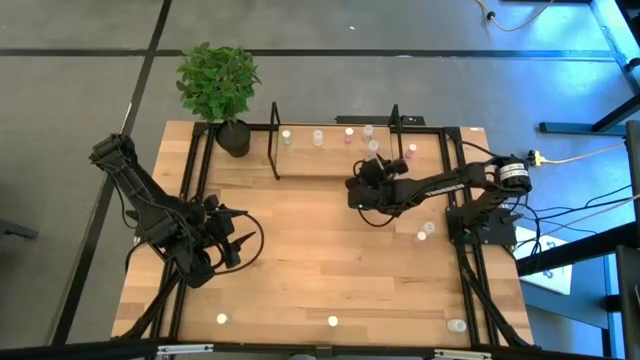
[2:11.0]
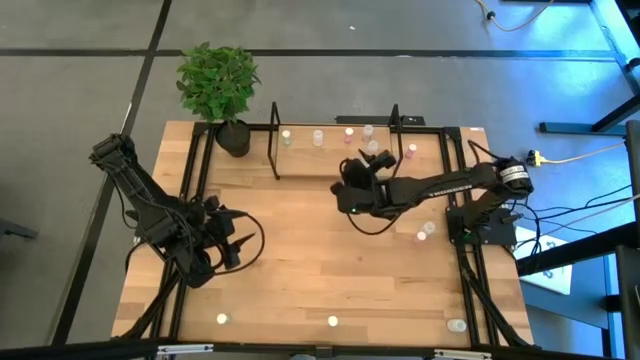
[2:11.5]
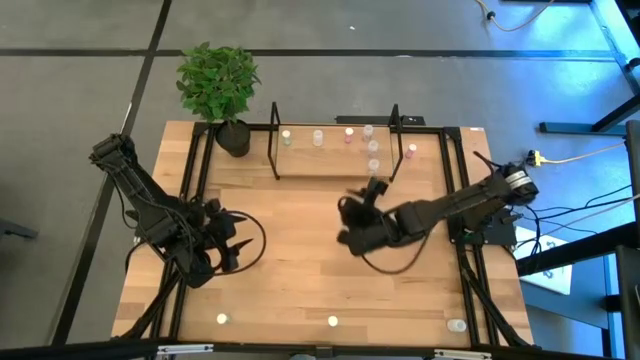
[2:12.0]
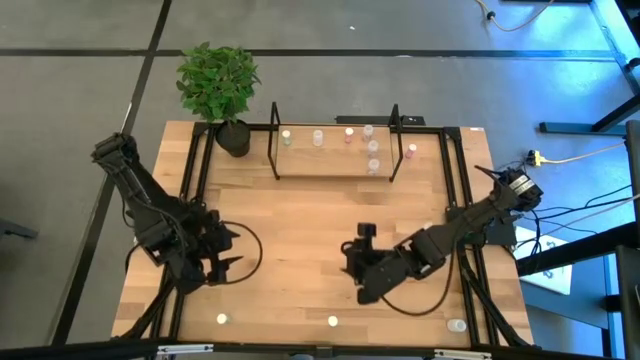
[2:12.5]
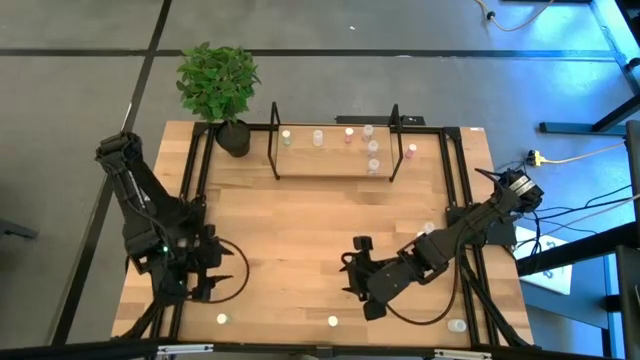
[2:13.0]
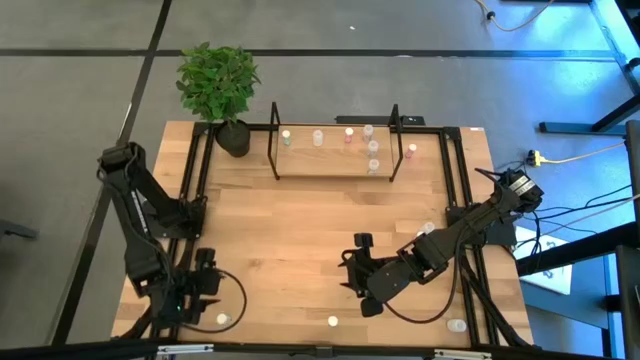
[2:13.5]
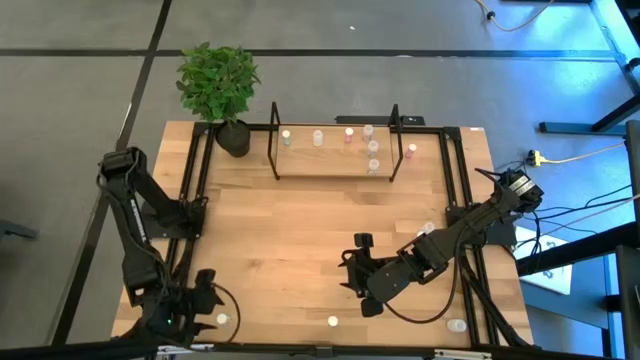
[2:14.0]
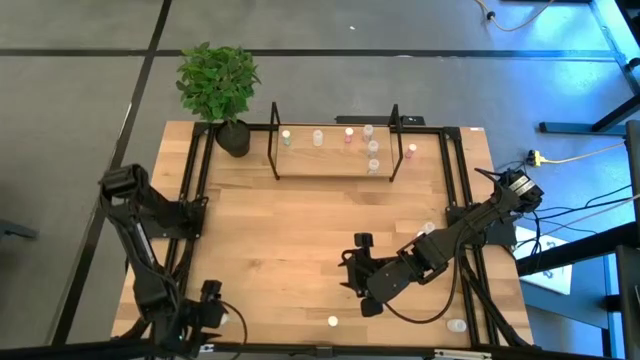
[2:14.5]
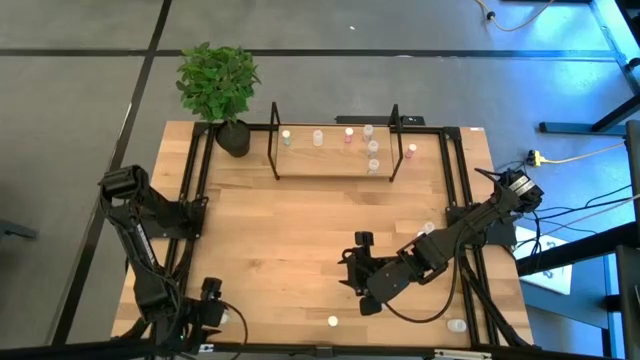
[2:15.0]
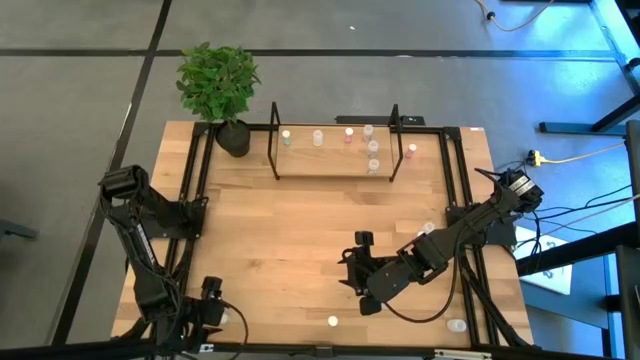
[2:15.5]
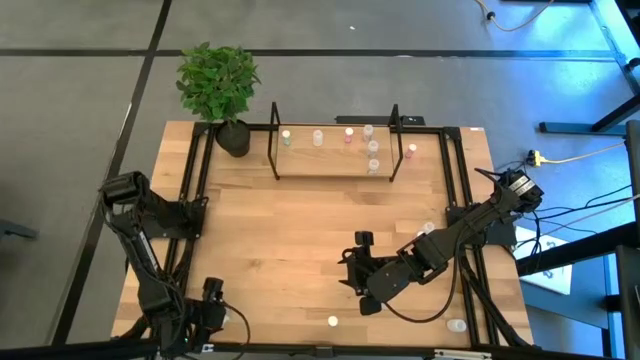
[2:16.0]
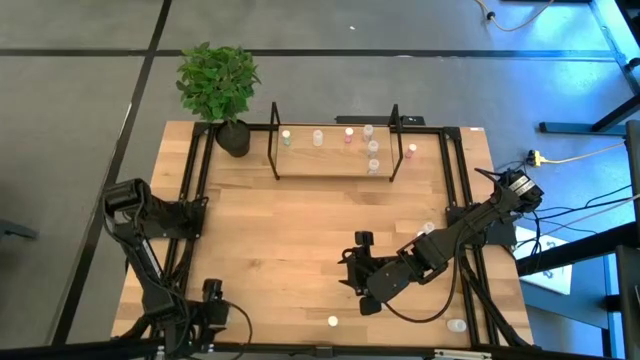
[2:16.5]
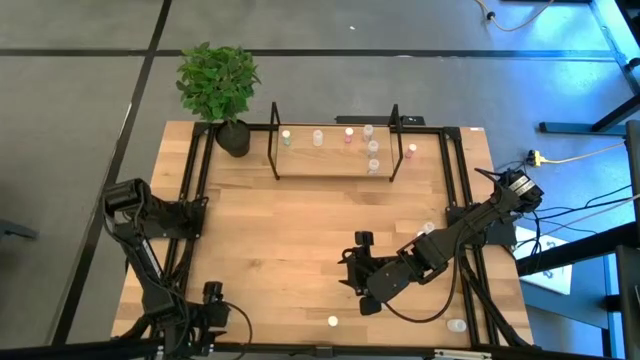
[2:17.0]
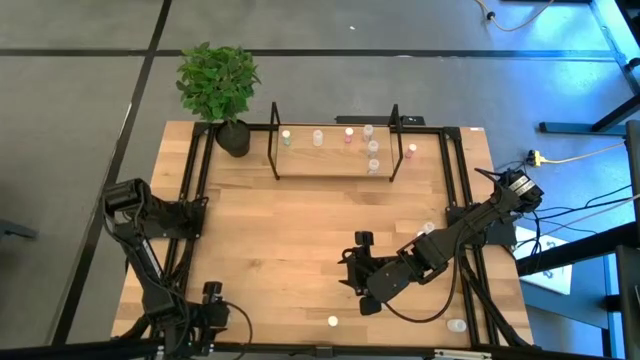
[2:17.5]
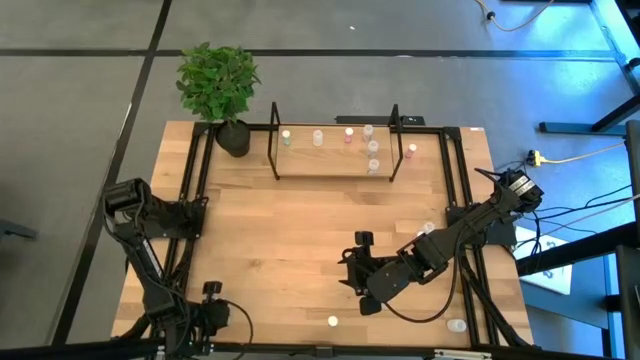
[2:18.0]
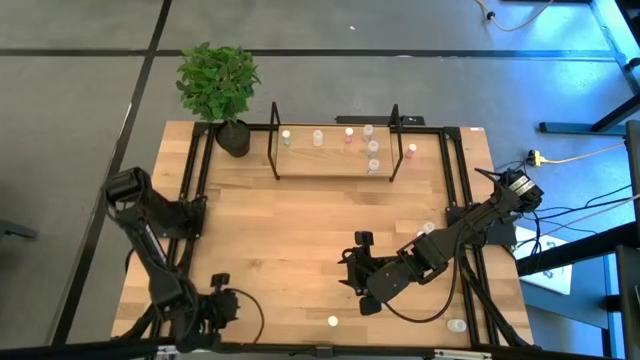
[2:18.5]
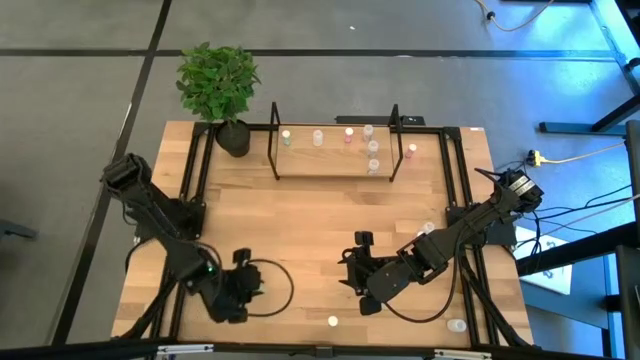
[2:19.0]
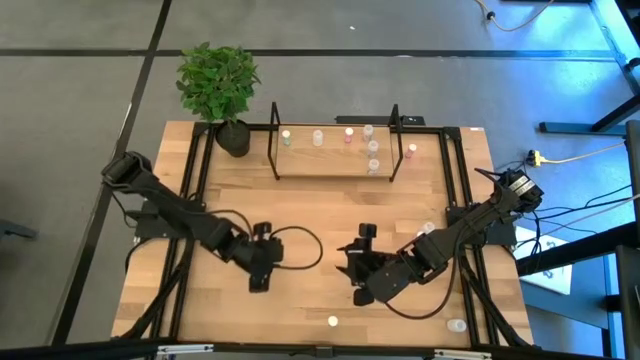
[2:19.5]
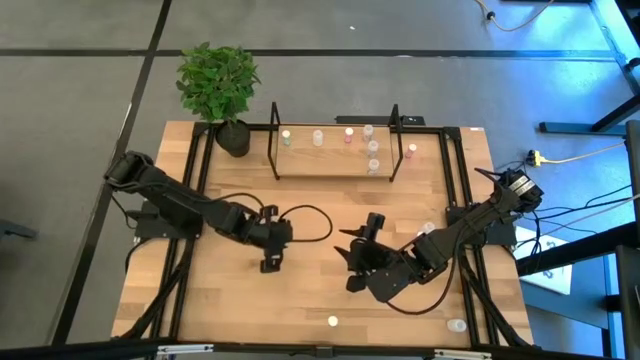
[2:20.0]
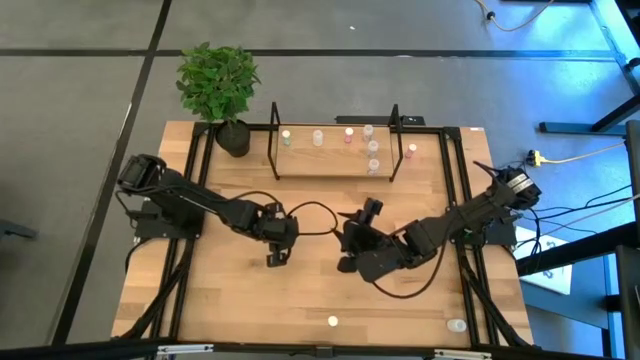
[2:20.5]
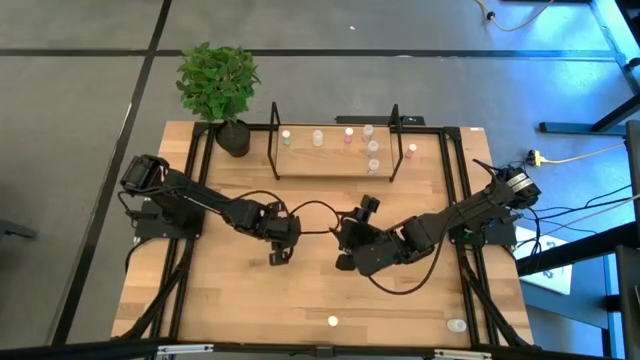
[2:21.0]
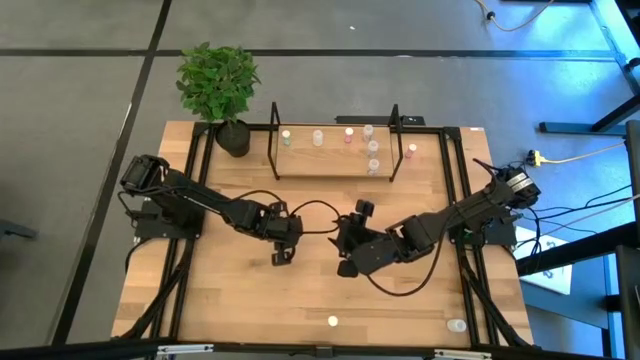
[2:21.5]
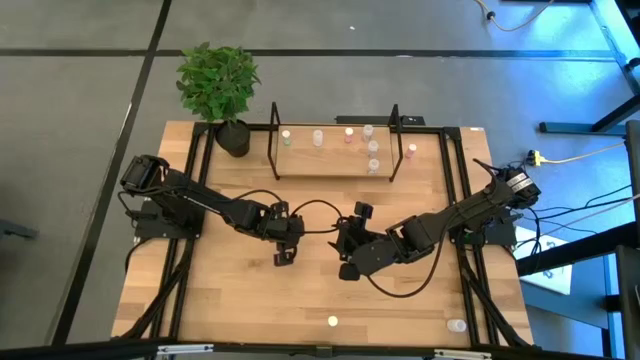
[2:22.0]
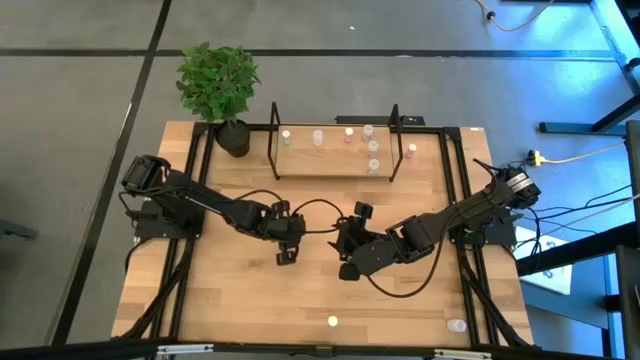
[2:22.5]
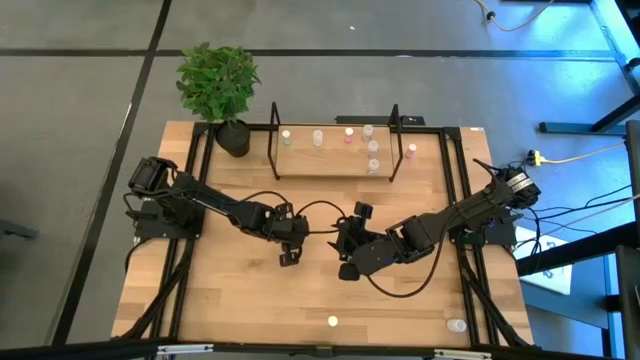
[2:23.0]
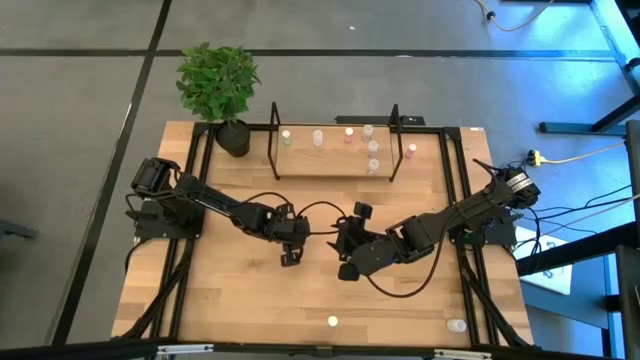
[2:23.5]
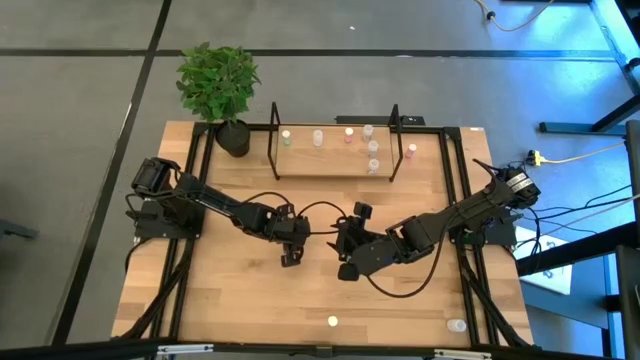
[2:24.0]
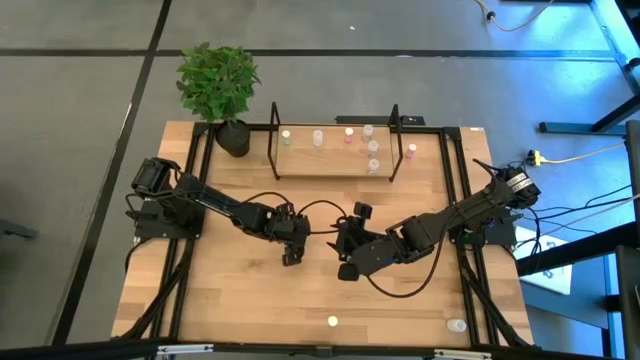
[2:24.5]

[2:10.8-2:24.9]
Task: Pick and place medicine bottles onto shelf by color
Put the bottom left blue medicine bottle on the shelf aligned with the other blue medicine bottle

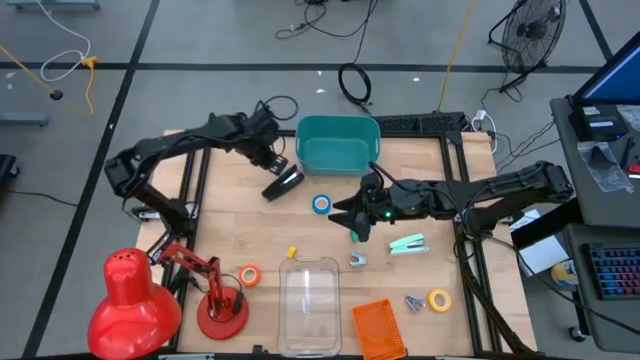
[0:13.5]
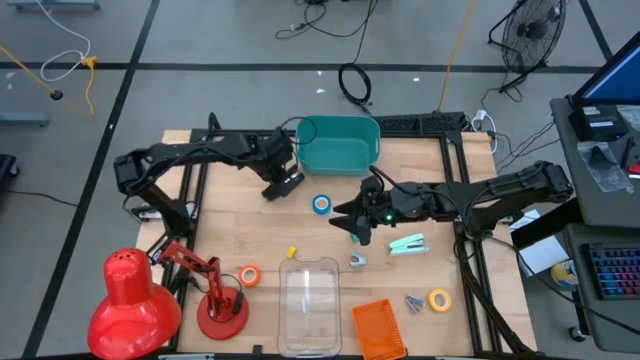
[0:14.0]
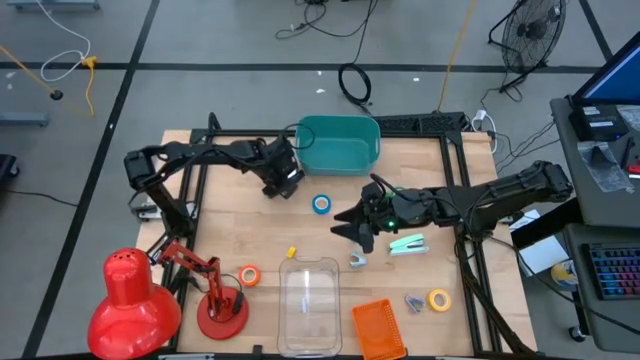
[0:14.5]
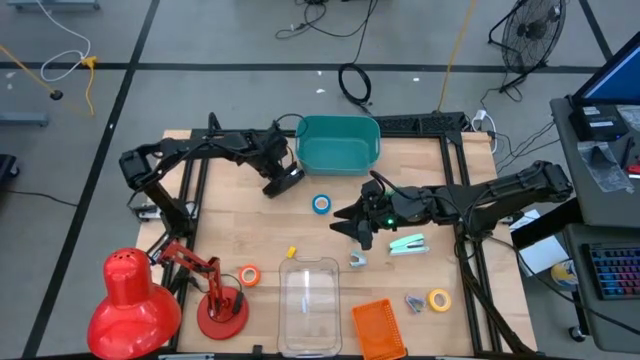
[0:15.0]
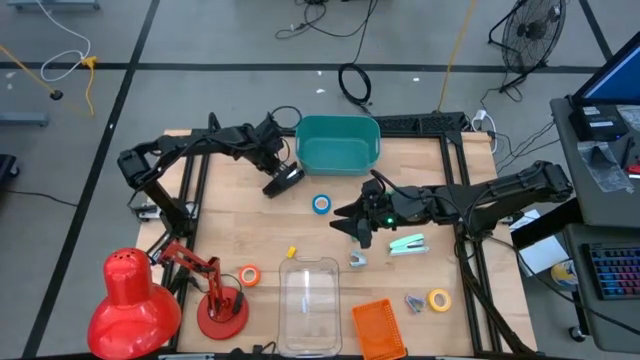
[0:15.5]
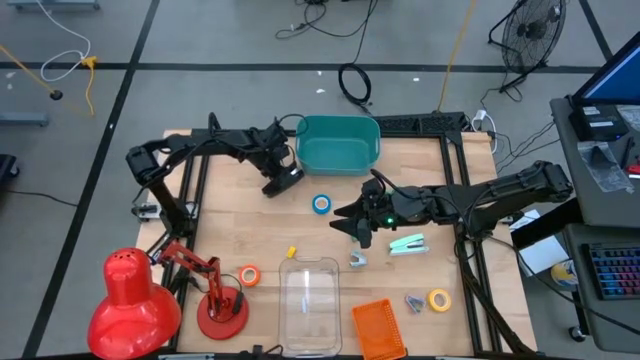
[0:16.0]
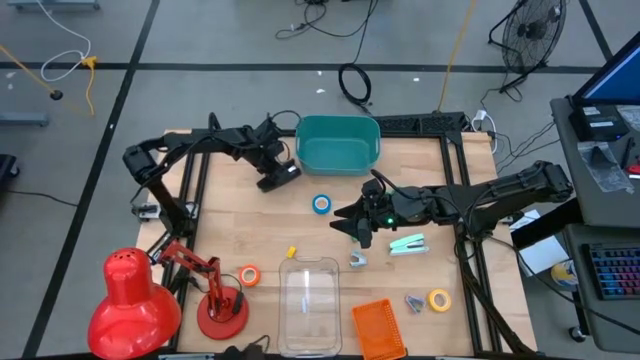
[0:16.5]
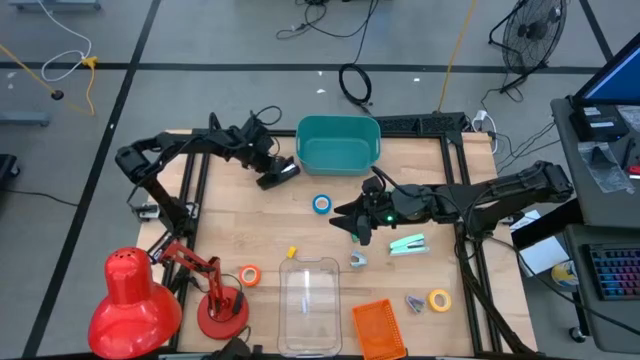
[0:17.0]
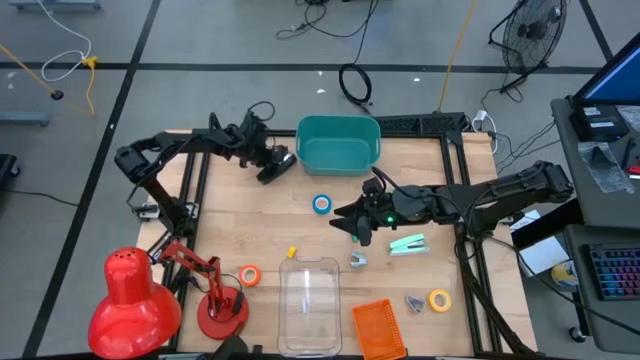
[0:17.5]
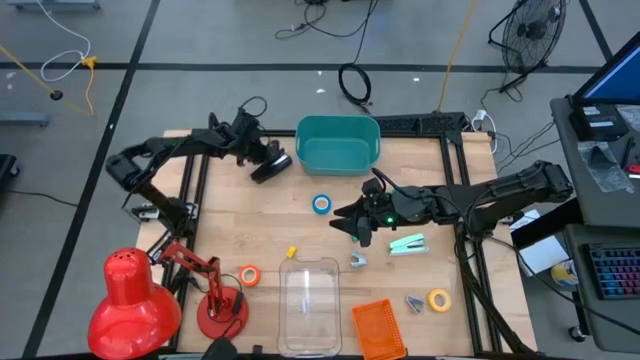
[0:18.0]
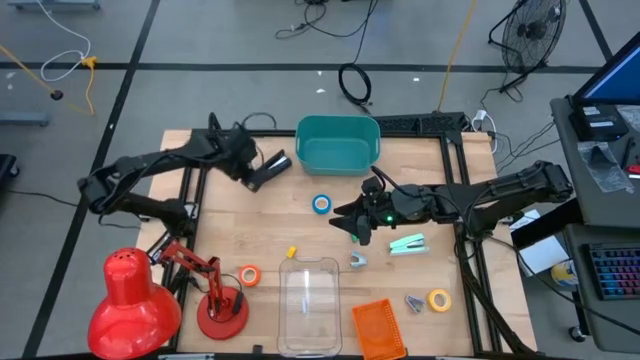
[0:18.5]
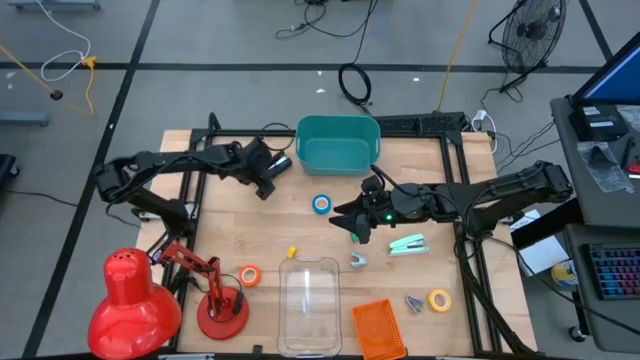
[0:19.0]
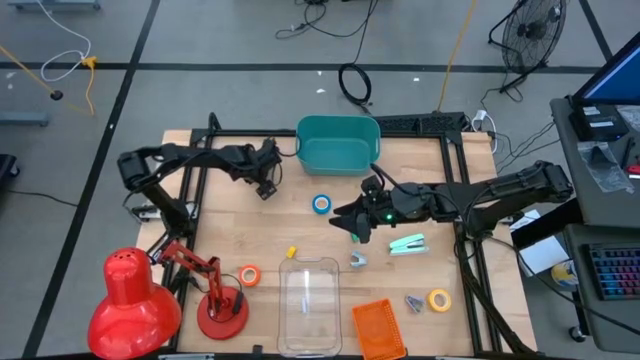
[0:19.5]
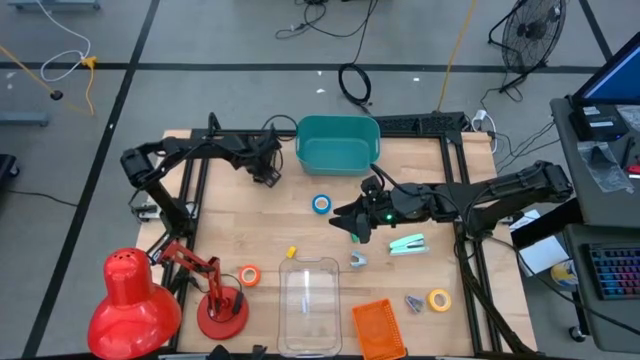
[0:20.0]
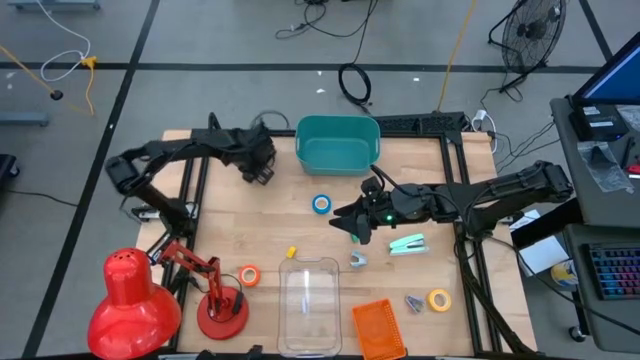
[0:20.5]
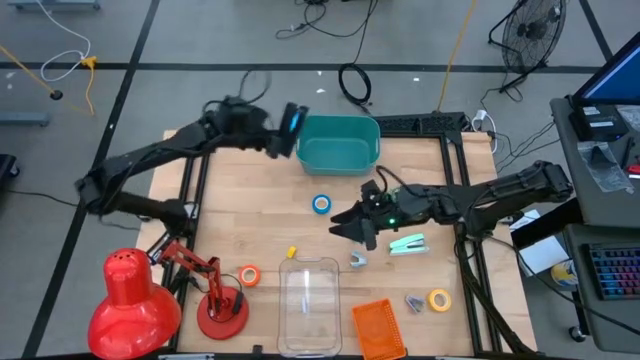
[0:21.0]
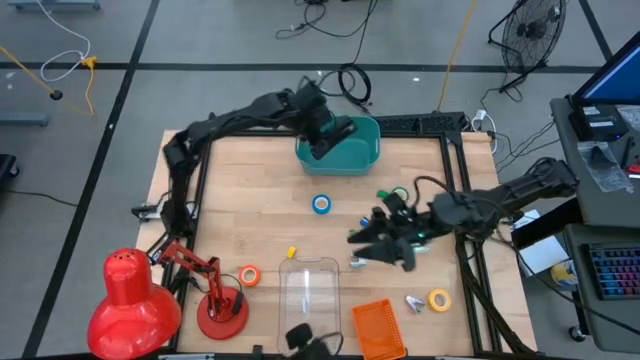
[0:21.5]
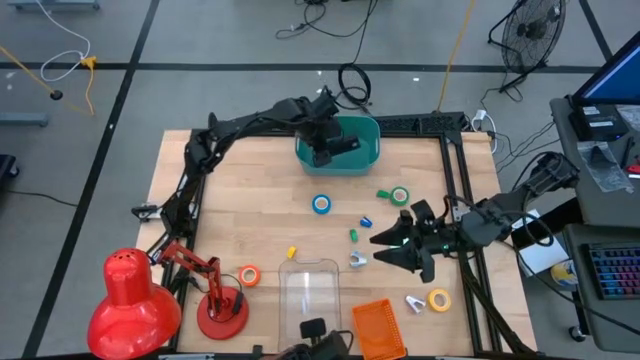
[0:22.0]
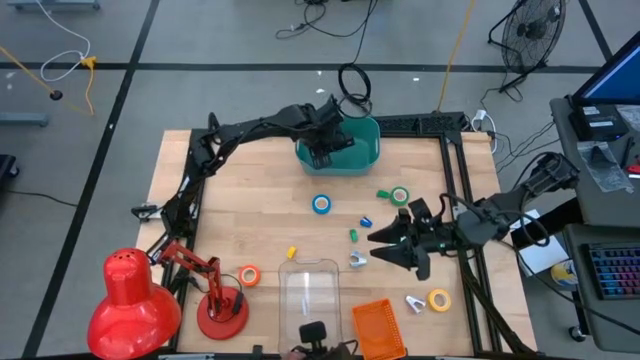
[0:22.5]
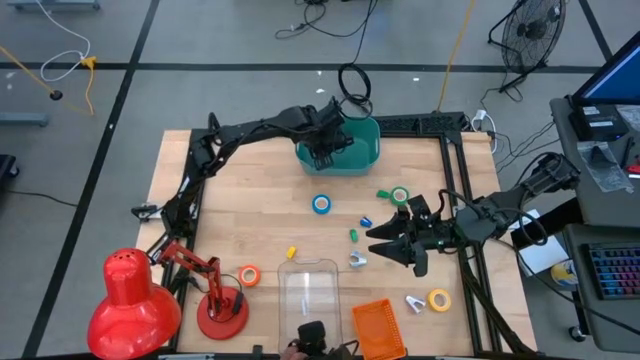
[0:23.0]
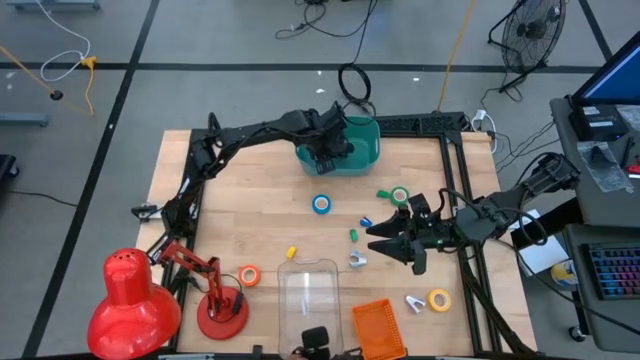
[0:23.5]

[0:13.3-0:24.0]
Task: Pick and place Stapler, Stapler remover, tape
Put the black stapler into the green bin
